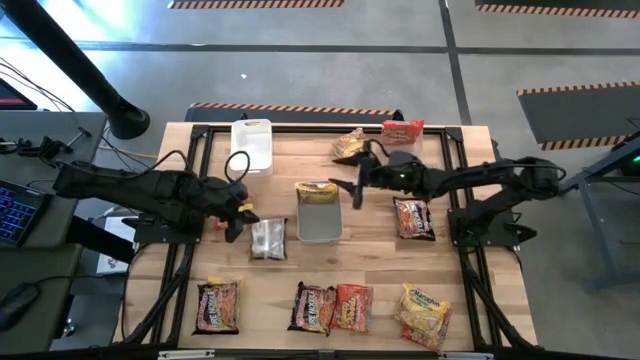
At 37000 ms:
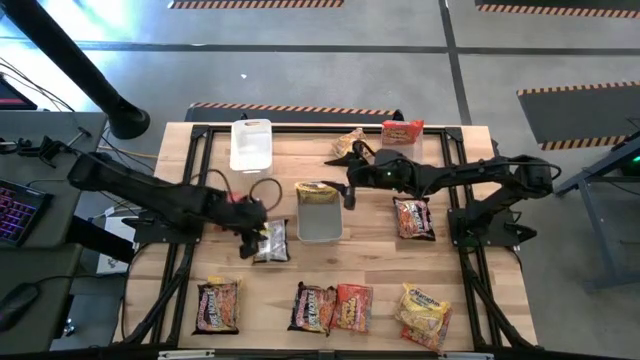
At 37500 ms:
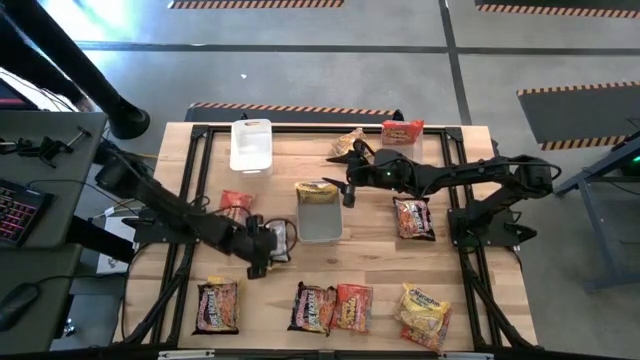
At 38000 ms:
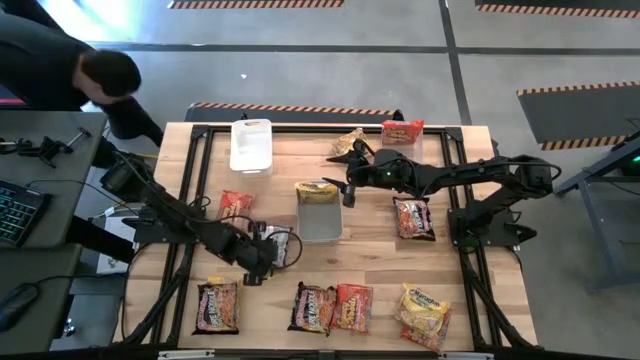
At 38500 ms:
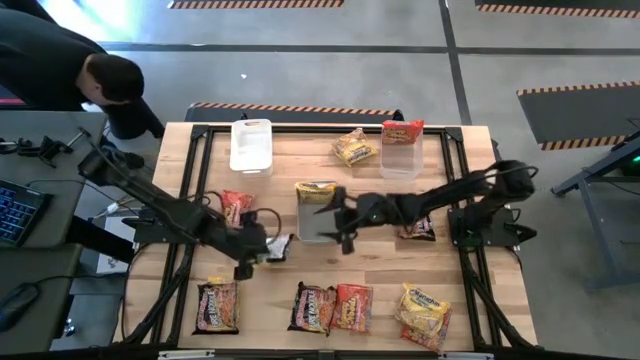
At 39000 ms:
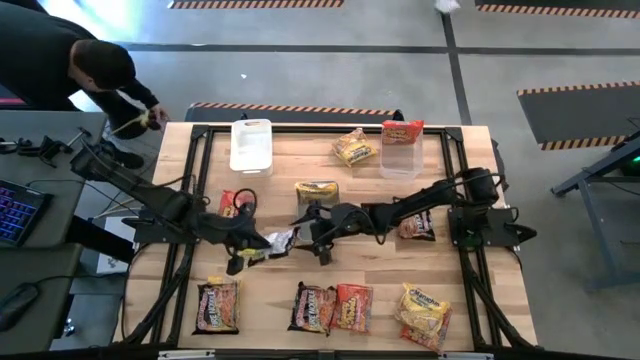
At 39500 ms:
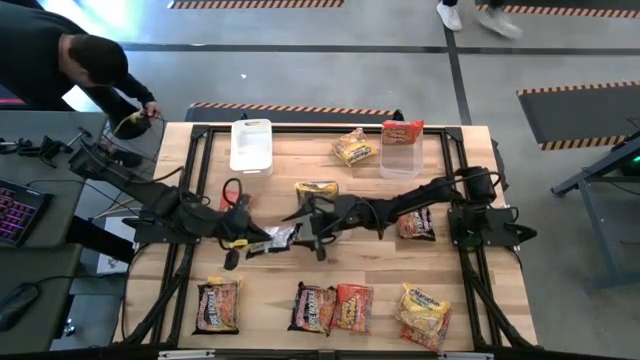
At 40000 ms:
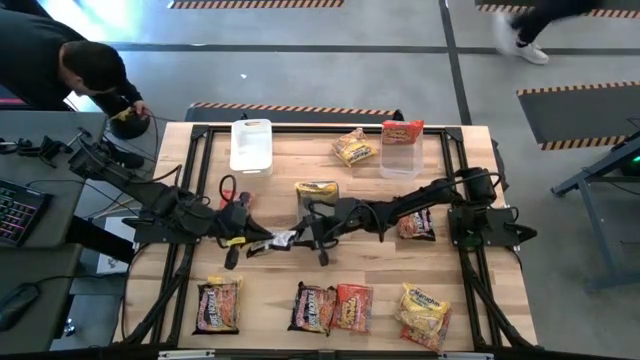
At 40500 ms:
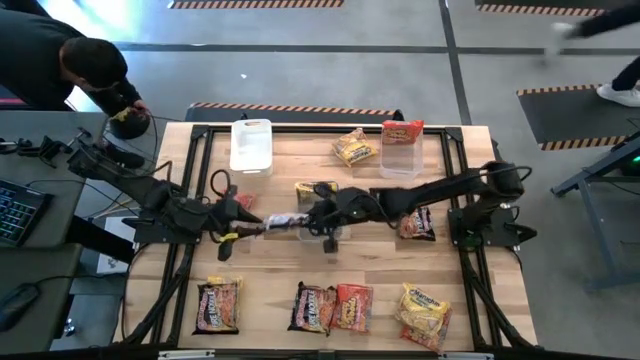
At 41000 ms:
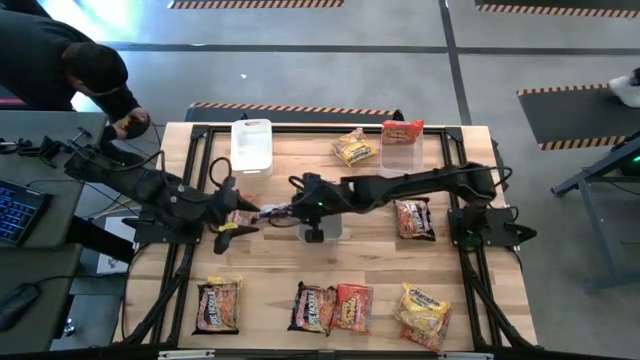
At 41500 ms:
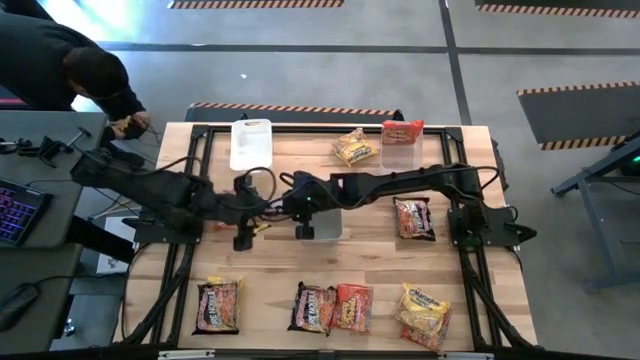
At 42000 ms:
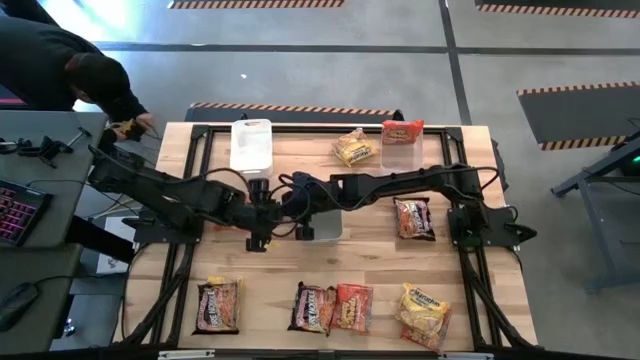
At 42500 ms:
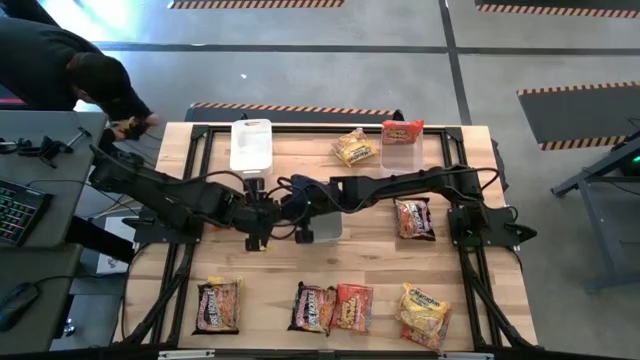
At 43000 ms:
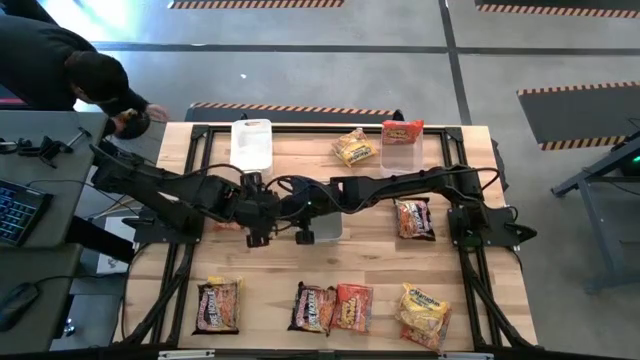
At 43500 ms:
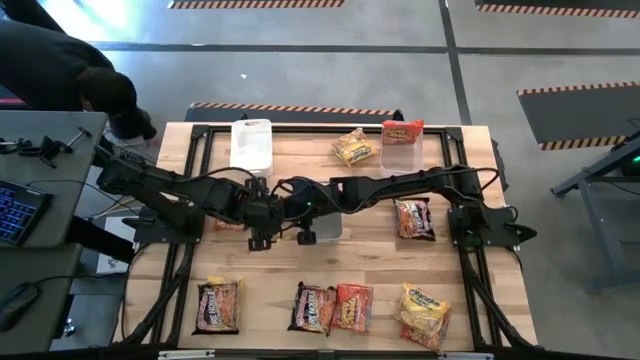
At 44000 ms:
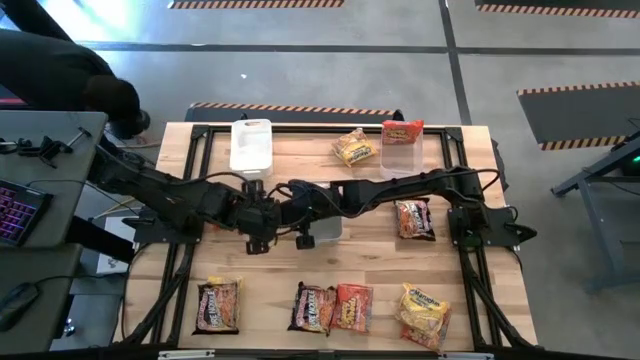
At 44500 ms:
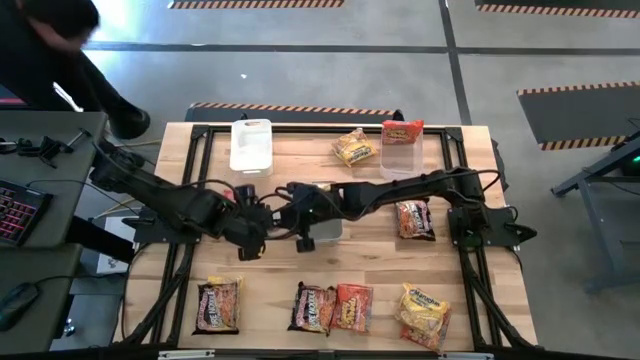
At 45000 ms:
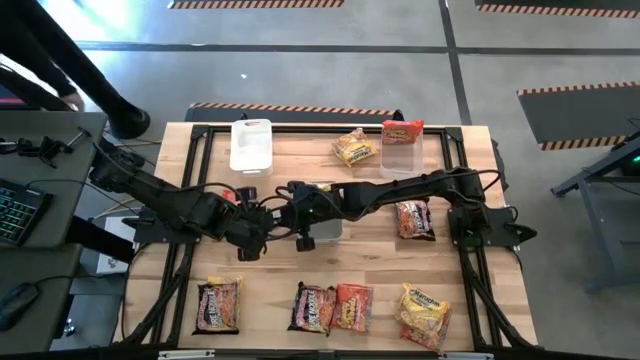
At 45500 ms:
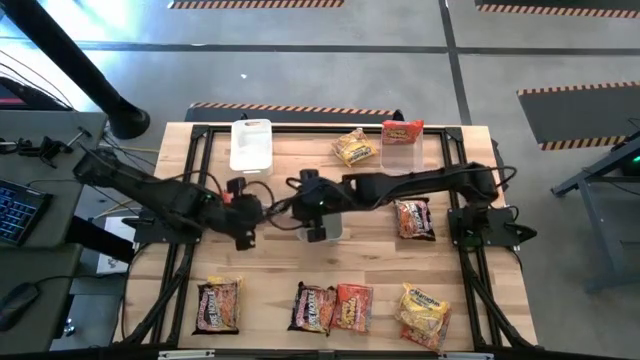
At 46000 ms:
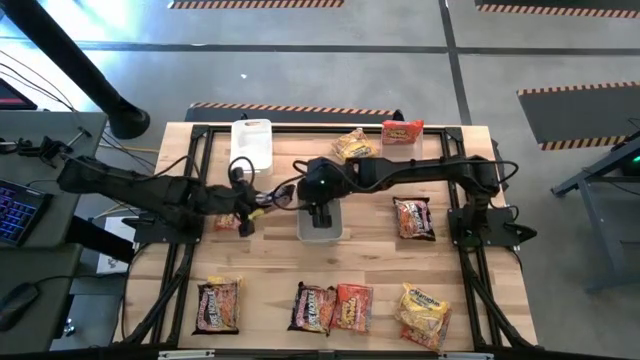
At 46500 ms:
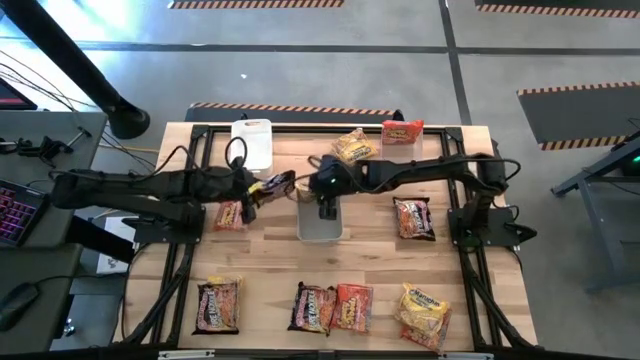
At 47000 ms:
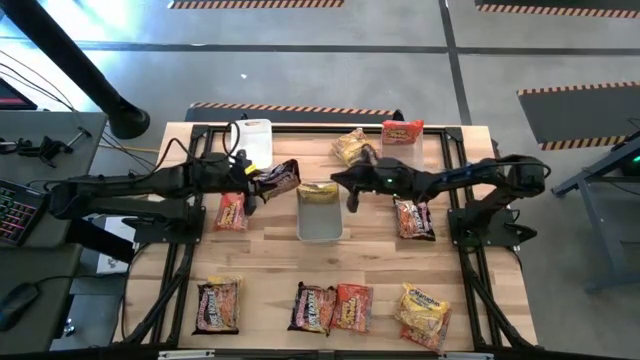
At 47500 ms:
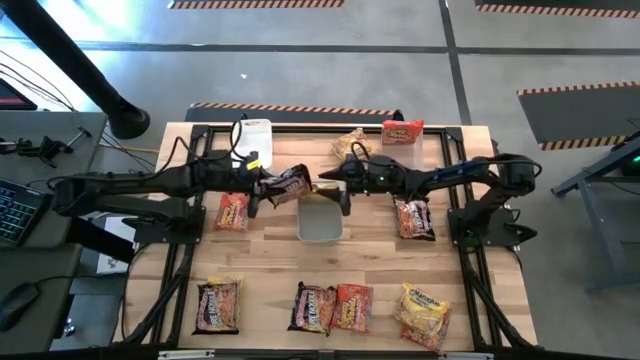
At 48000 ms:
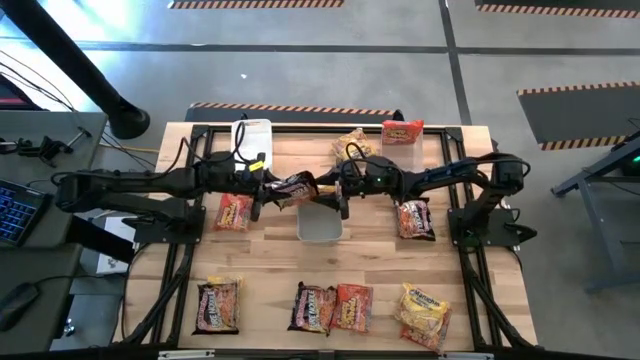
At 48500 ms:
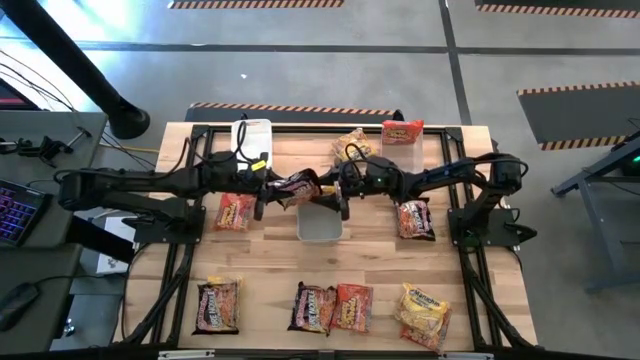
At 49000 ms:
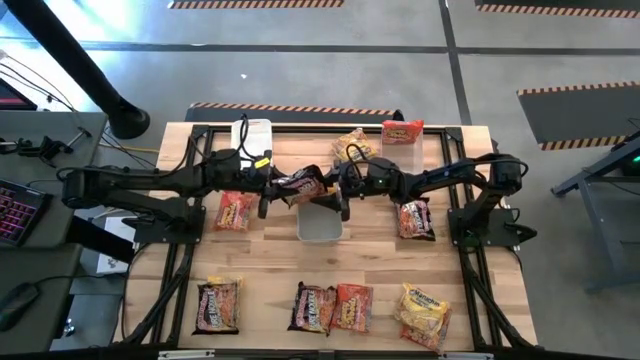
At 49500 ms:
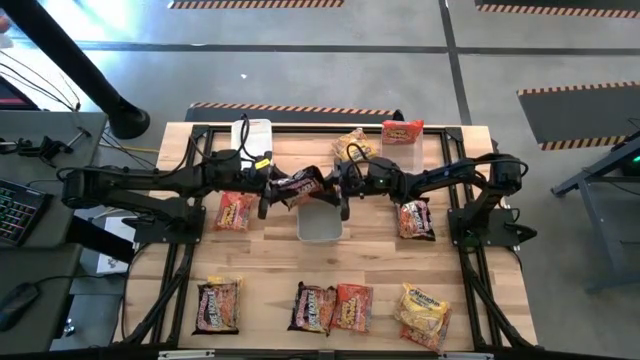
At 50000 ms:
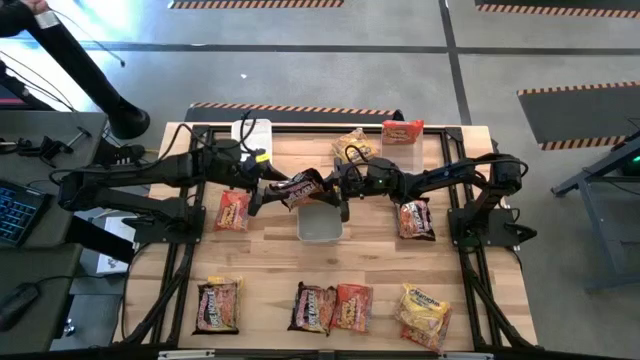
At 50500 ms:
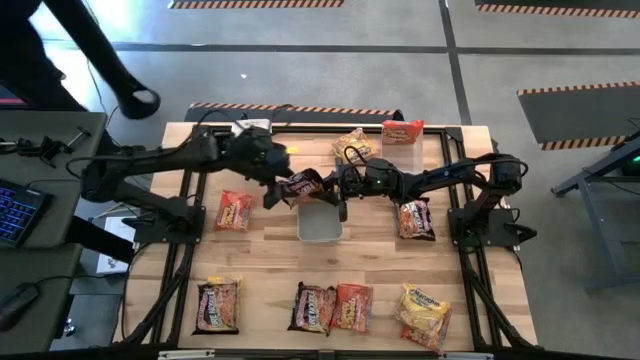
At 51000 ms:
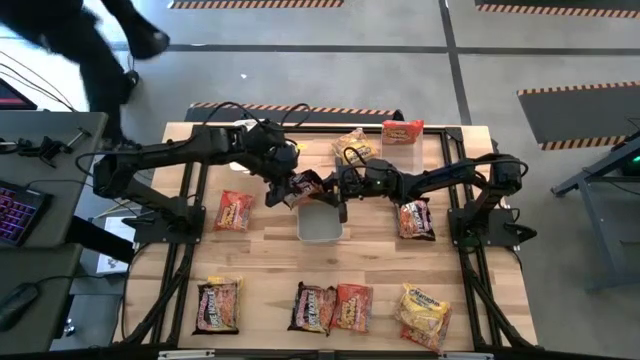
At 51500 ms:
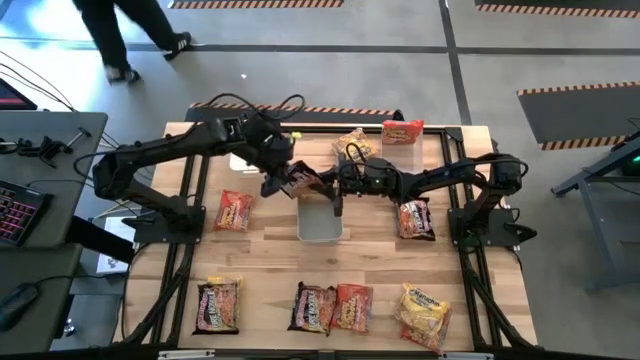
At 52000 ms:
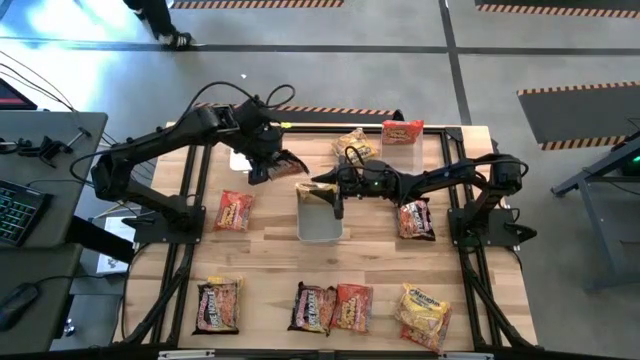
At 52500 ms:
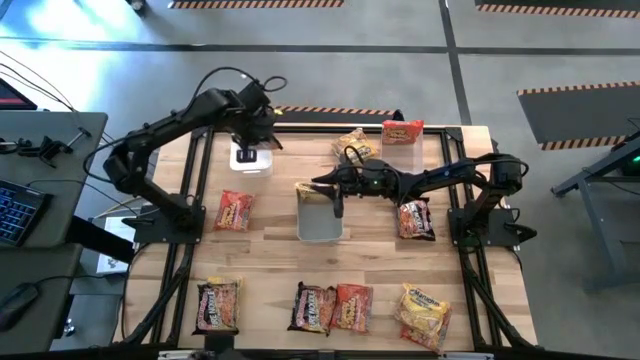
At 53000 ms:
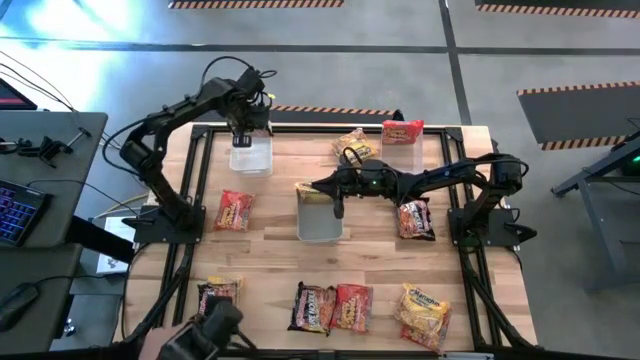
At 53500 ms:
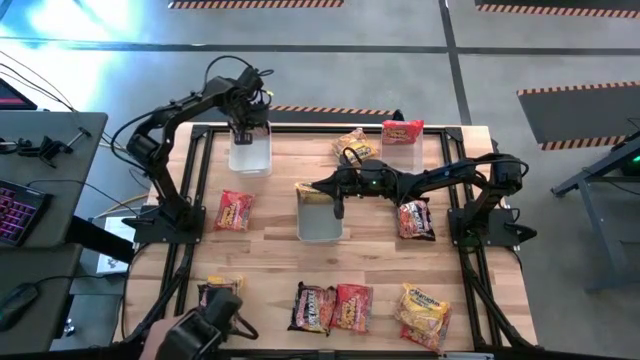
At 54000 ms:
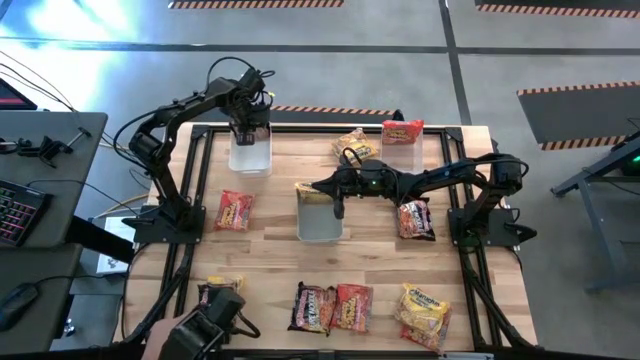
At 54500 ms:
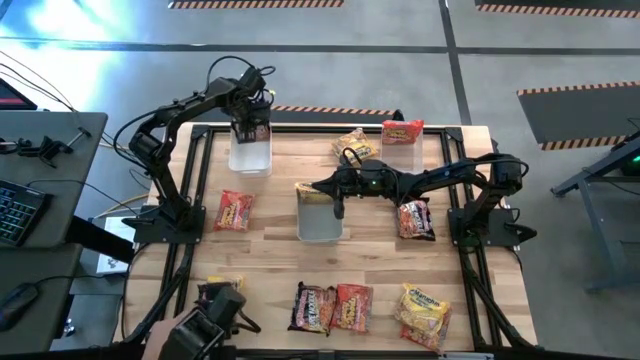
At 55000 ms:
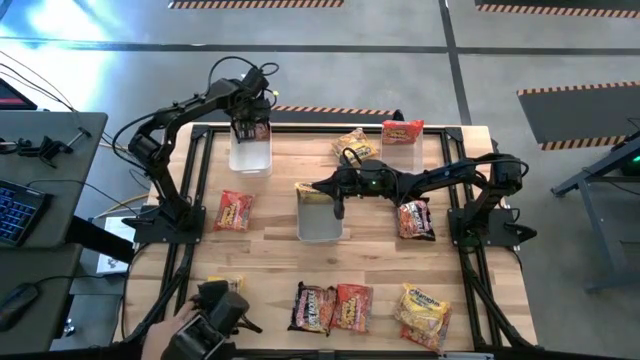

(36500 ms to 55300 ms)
Task: Sort Maruchan noodles
Put the black noodle pack into the white bin

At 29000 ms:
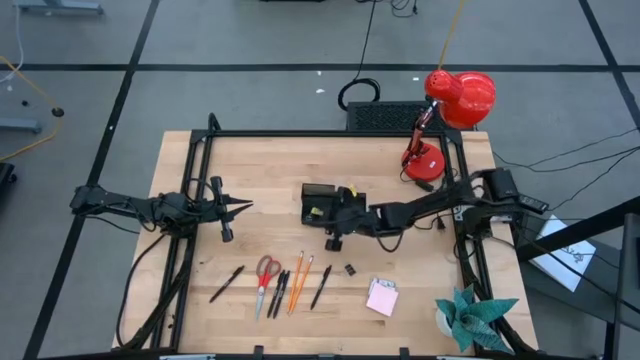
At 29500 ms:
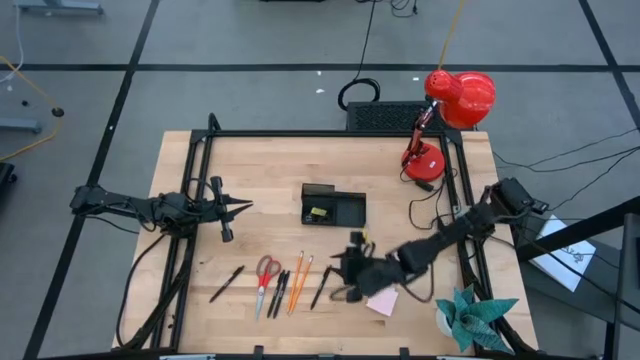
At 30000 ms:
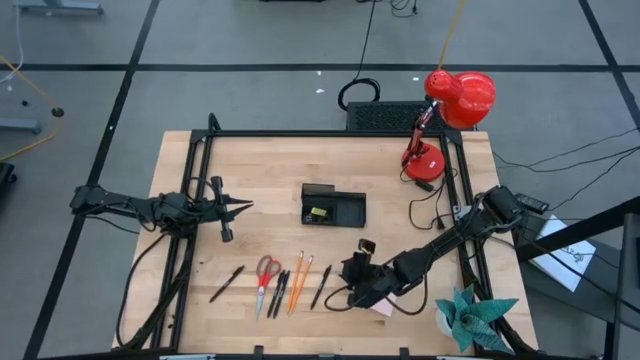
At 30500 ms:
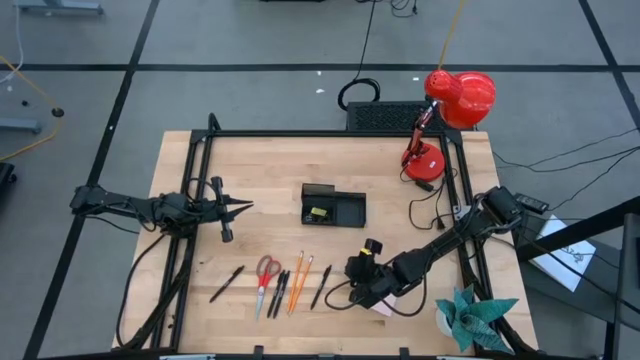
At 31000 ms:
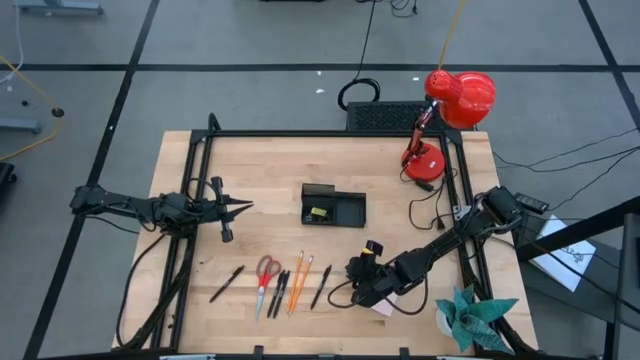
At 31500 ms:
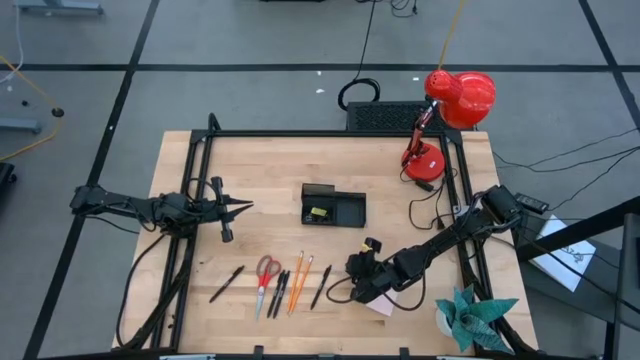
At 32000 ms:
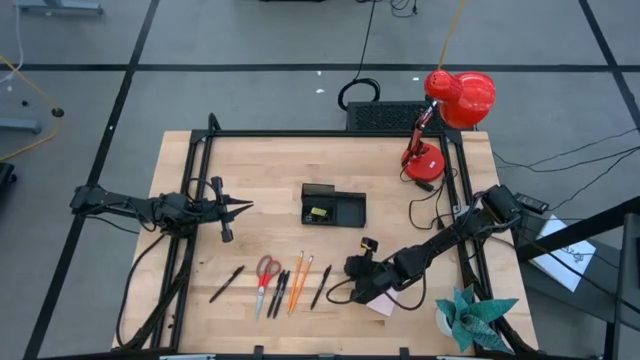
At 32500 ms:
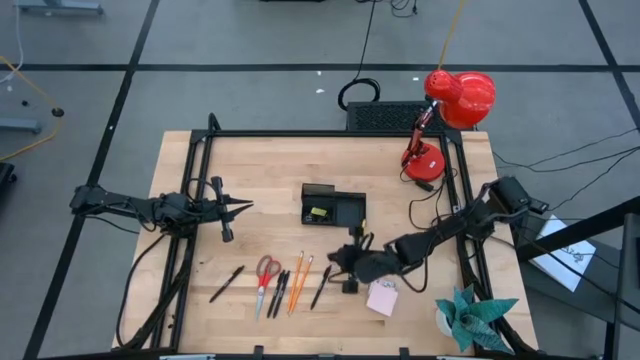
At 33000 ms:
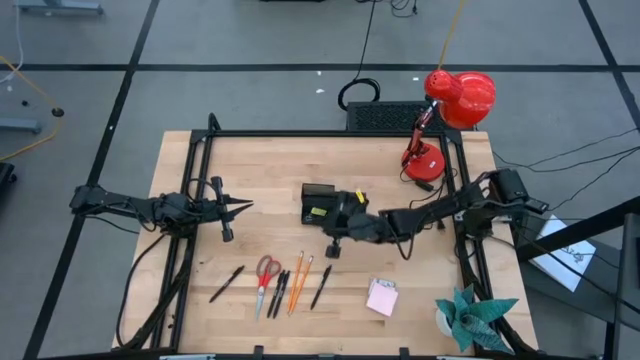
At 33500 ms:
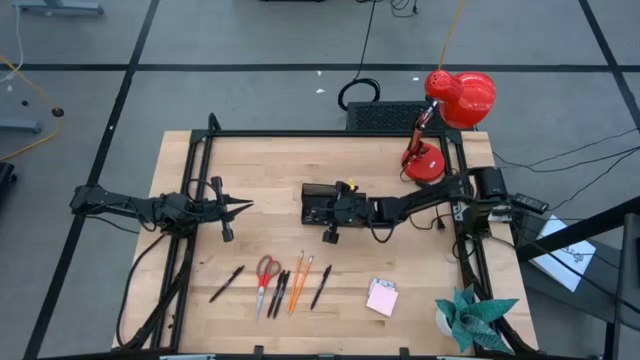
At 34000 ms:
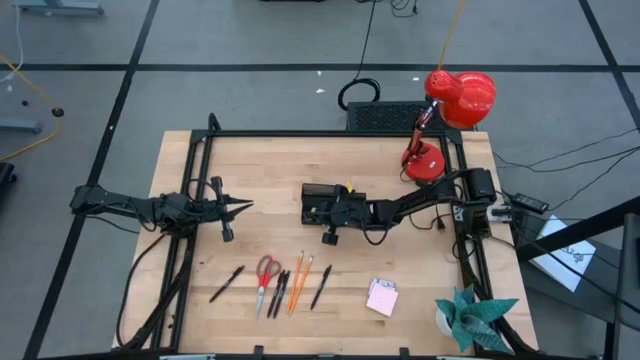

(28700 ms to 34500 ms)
Task: Pick and place office supplies into organizer
Put the binder clip into the desk organizer
